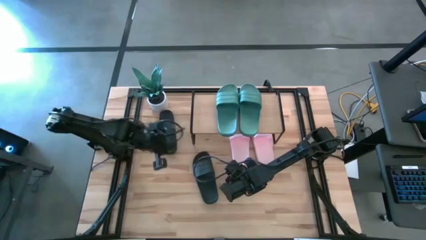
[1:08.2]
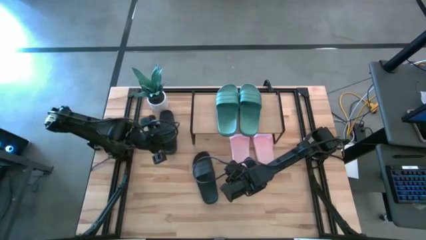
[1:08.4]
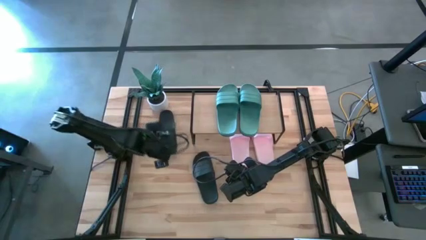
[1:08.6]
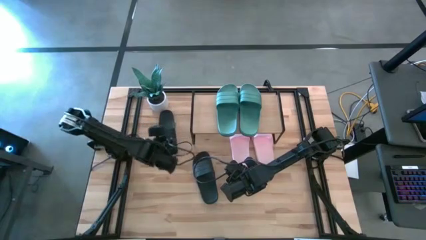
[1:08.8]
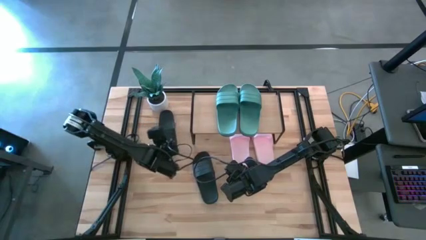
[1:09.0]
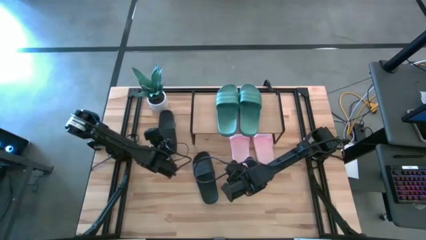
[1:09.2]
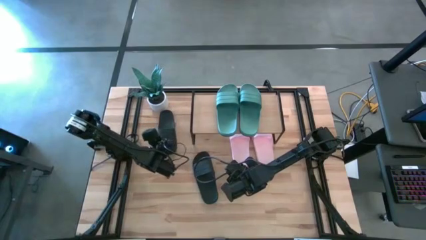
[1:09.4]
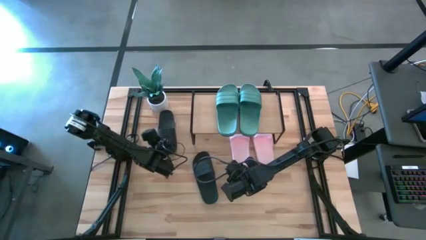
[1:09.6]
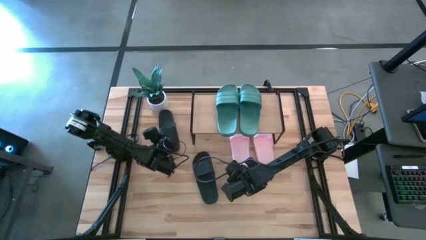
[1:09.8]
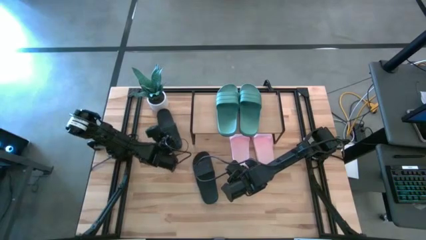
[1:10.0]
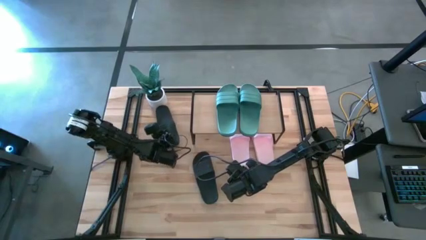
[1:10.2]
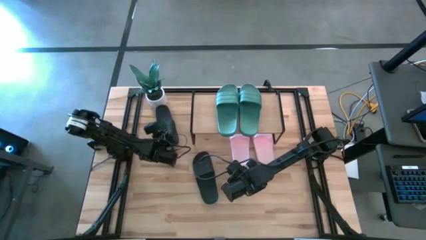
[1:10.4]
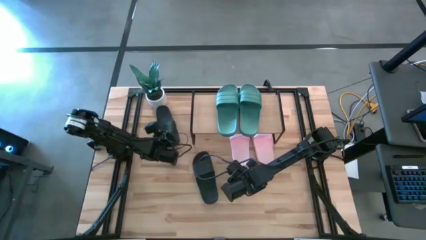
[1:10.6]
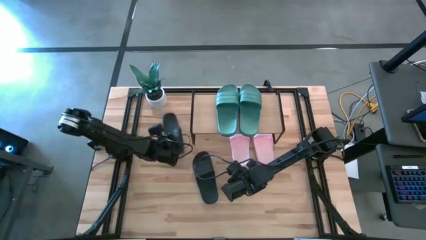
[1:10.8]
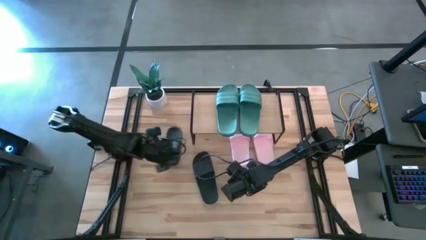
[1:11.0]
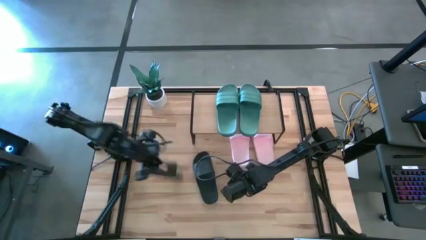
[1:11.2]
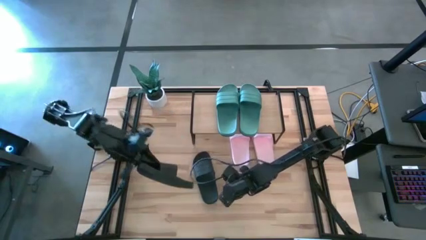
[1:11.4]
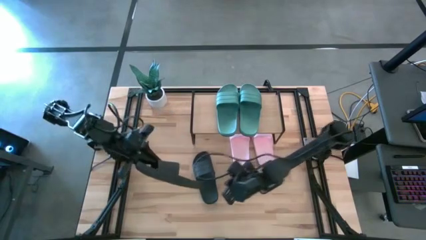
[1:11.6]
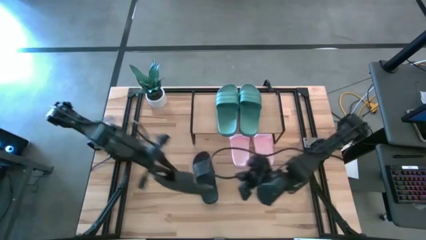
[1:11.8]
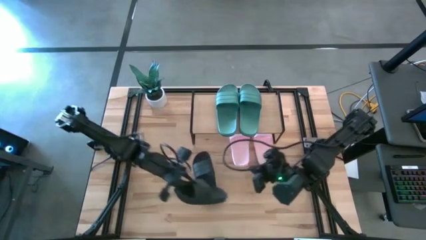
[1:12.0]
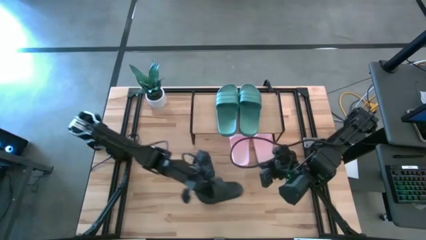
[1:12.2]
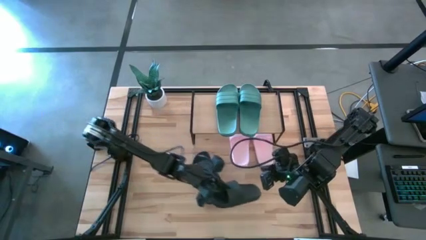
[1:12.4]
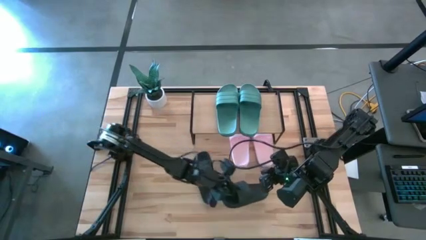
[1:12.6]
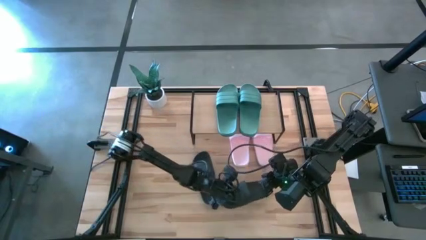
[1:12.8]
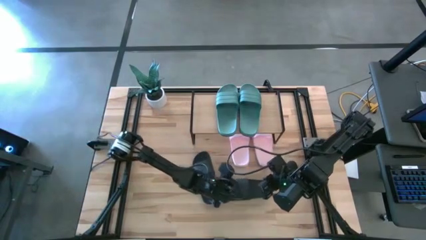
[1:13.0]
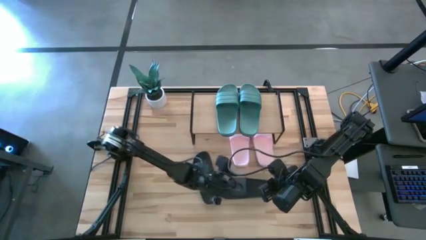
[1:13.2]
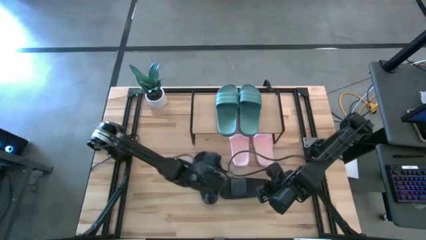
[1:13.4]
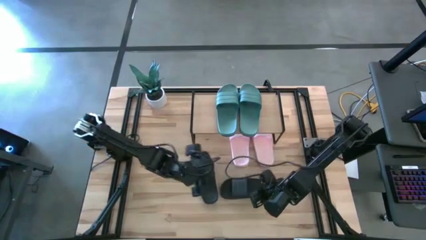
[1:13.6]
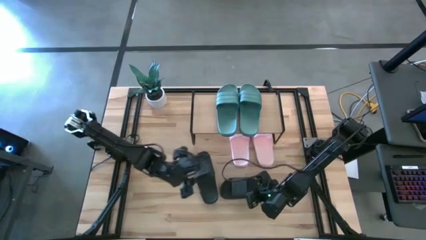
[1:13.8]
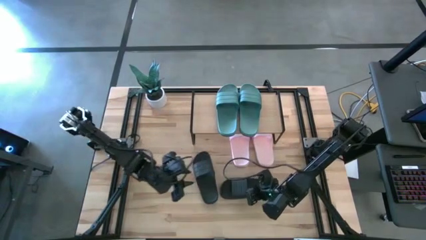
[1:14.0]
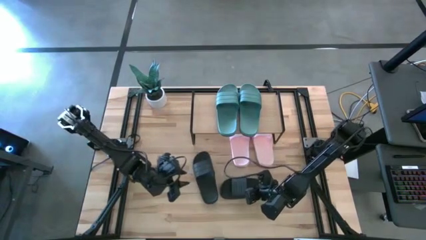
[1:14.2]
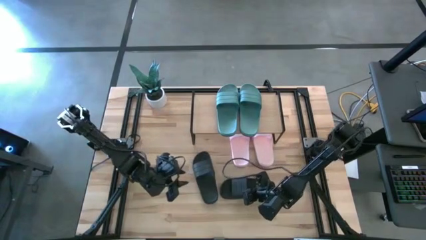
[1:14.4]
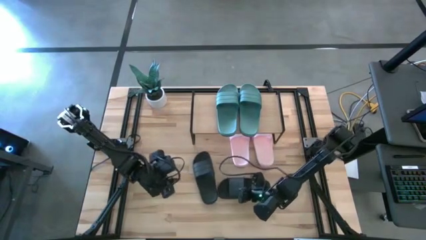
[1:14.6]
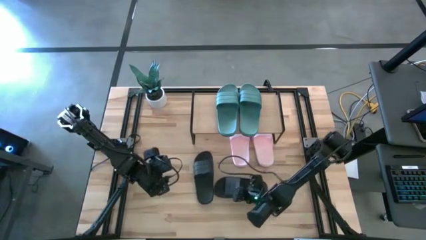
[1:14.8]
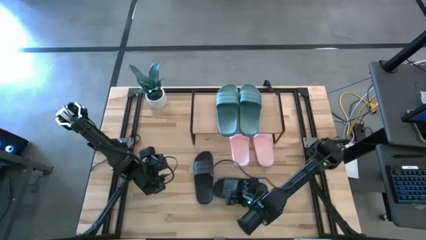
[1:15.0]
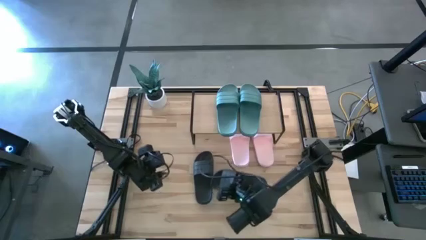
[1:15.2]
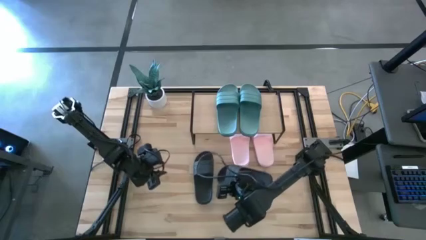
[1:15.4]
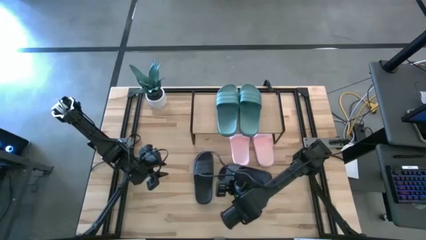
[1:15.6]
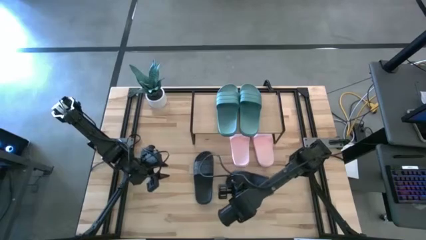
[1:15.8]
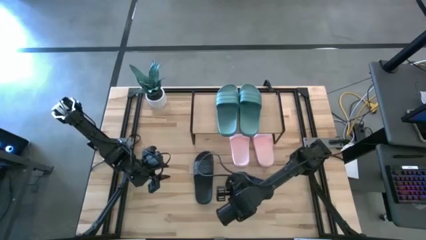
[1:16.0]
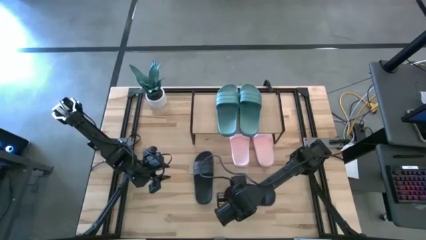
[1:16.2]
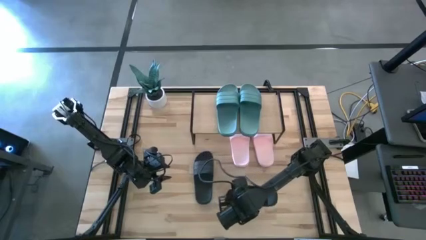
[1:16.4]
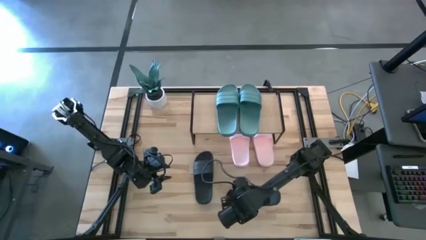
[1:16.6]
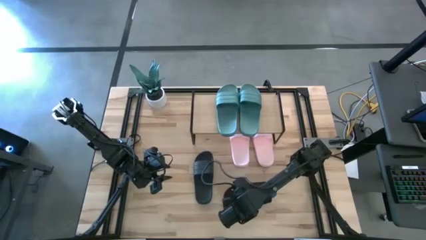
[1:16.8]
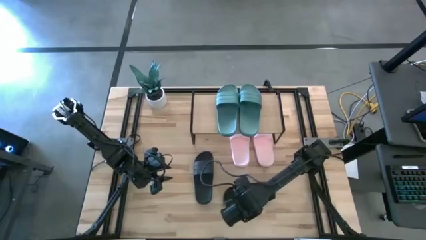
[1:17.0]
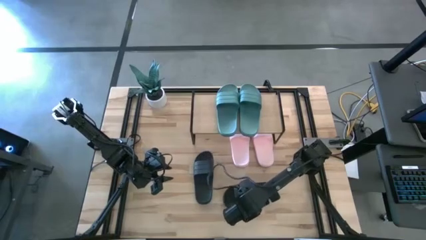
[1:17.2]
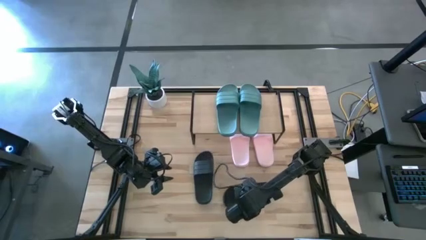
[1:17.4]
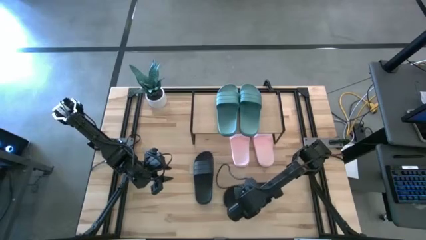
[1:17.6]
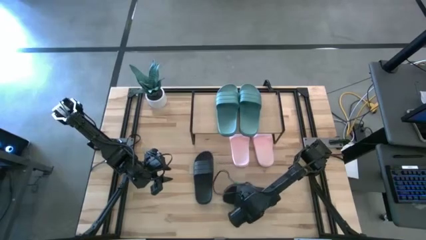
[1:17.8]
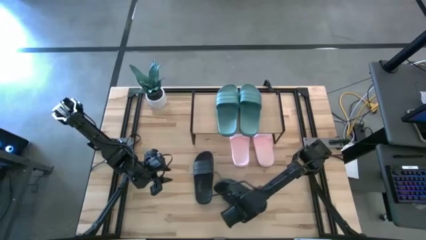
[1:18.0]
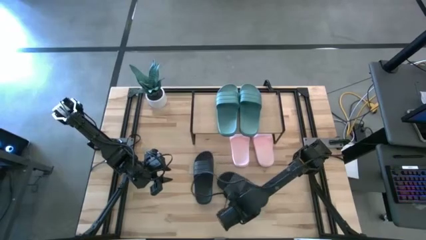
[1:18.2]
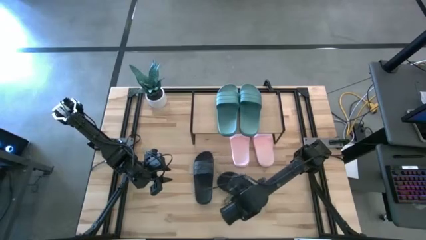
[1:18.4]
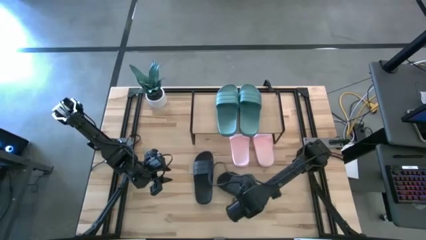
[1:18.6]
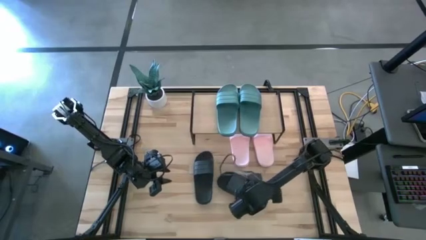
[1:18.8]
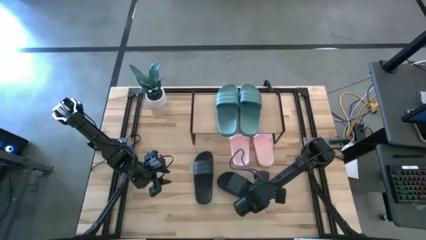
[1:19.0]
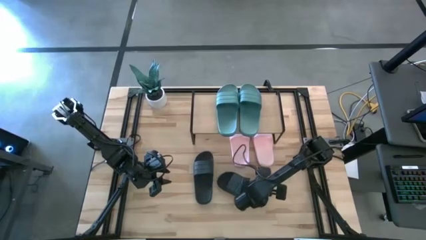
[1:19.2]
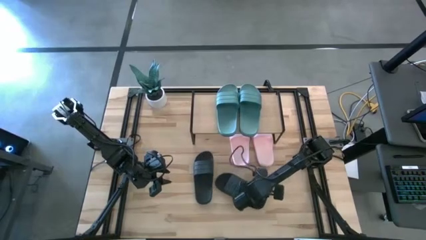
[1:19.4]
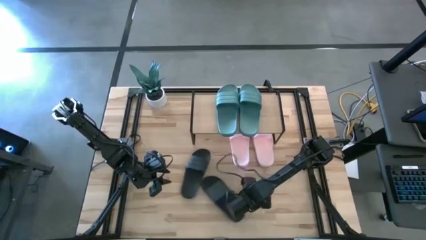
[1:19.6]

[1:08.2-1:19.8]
Task: Pick and place slides into the shelf
Move the left black slipper to the right of the left black slipper
